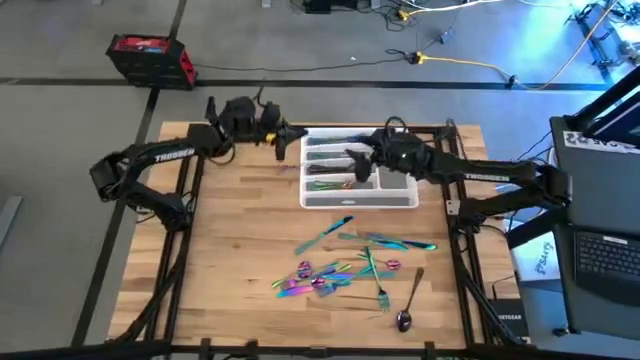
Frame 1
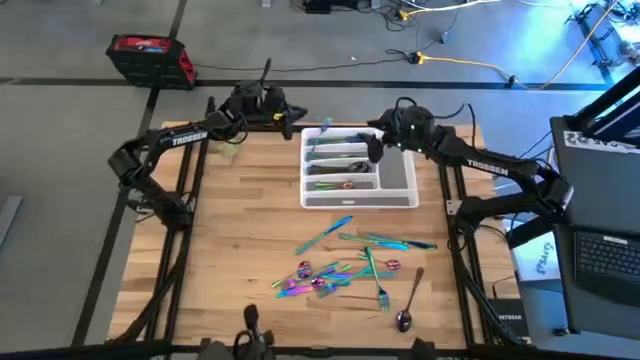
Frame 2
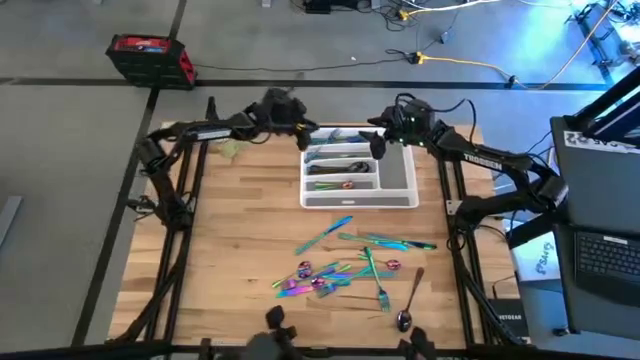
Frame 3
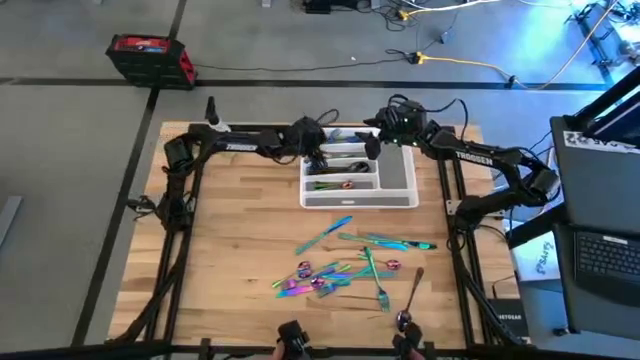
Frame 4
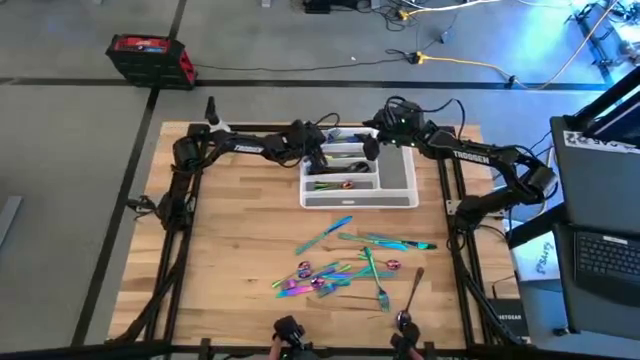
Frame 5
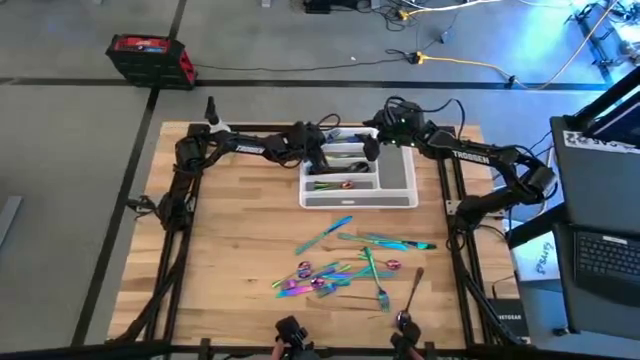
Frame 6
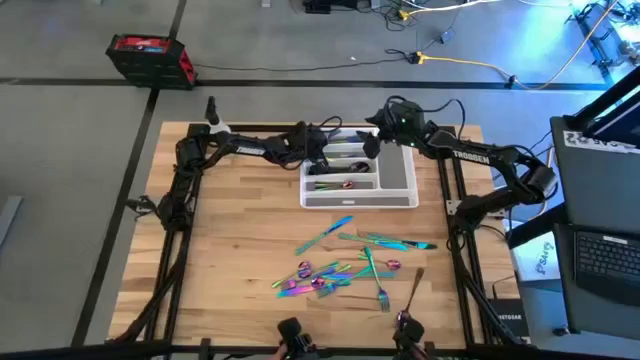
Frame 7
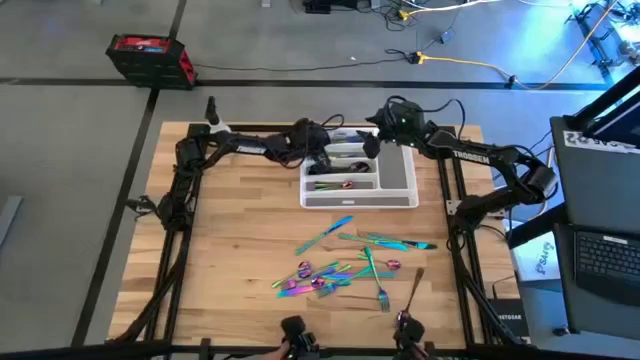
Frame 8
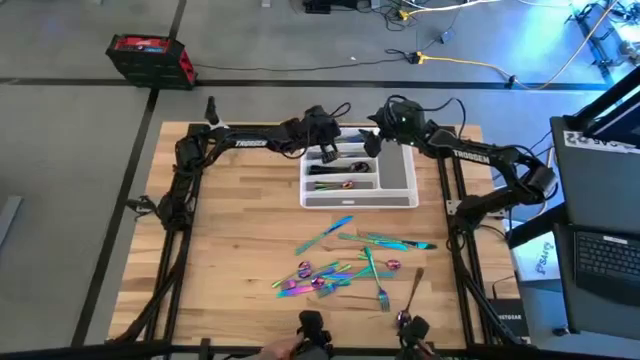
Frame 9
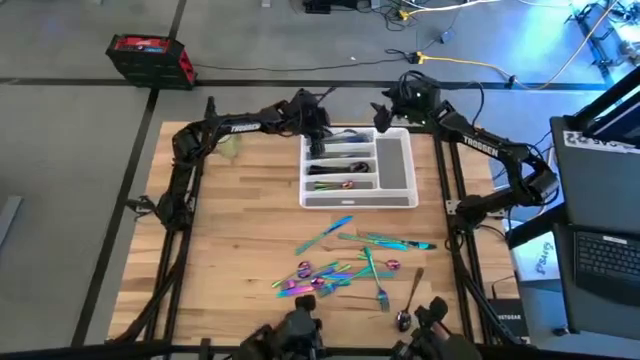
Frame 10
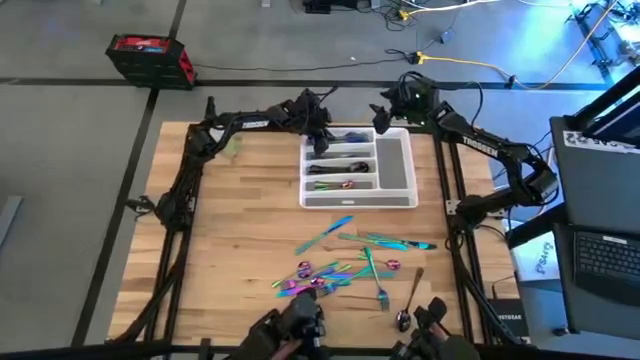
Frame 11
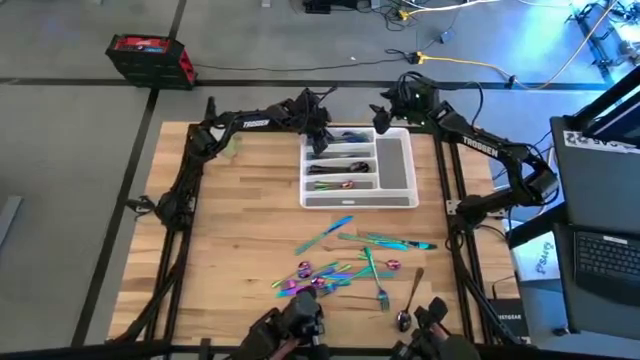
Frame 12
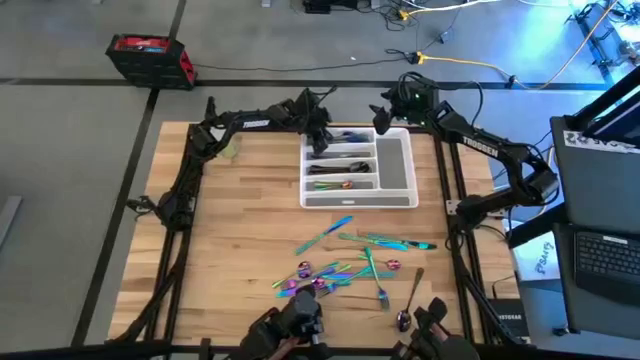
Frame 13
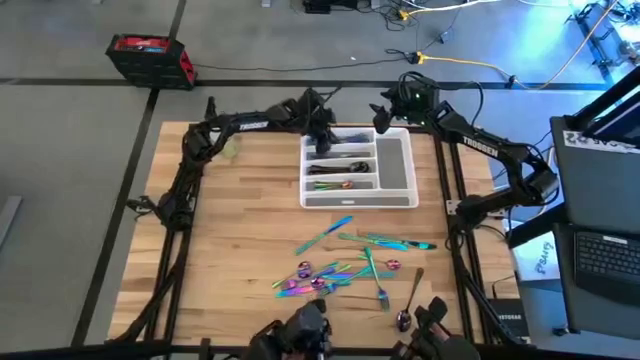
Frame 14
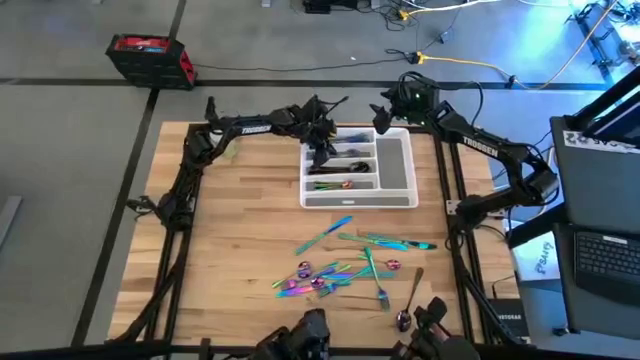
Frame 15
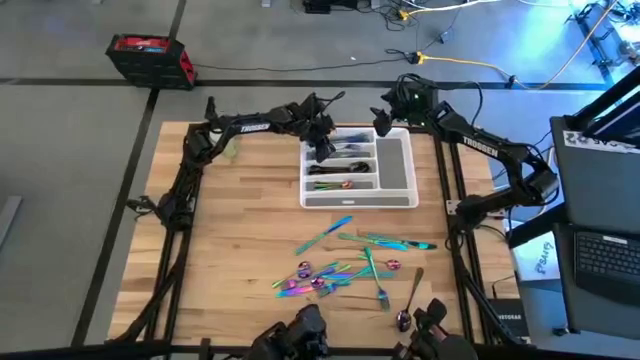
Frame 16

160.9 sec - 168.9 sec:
Task: Sort silverware
Put the blue fork on the white silverware tray

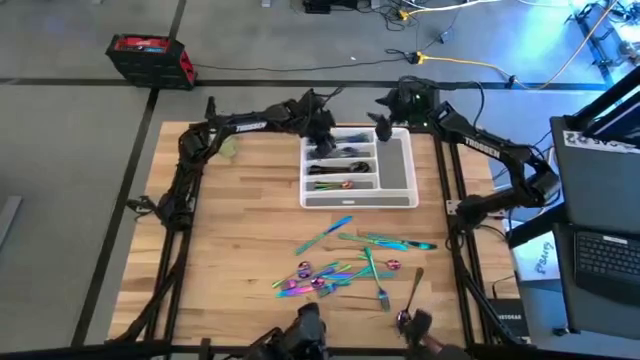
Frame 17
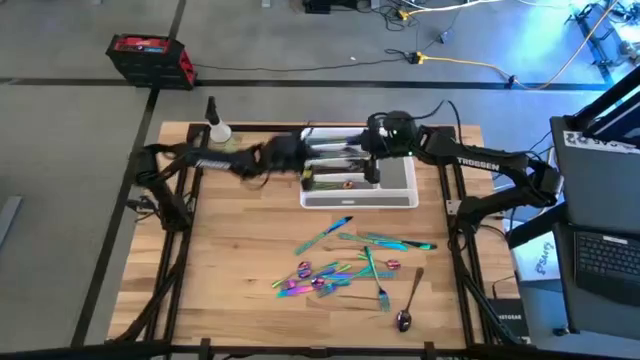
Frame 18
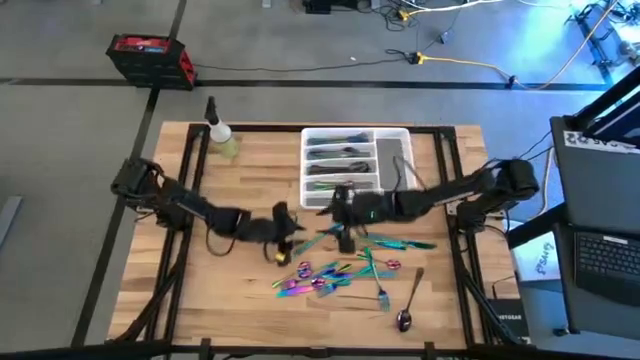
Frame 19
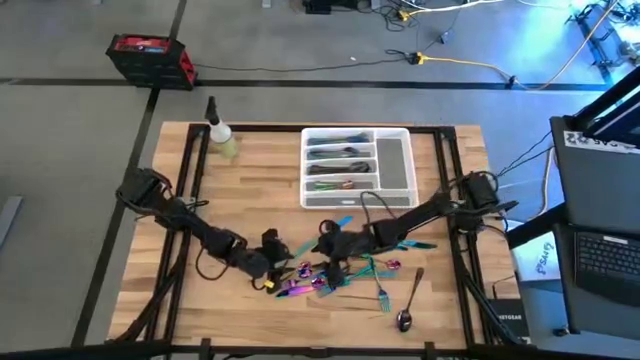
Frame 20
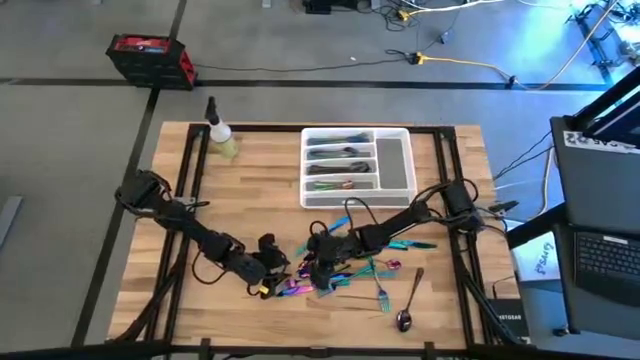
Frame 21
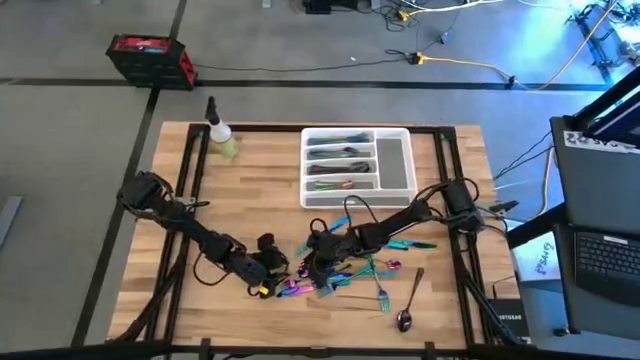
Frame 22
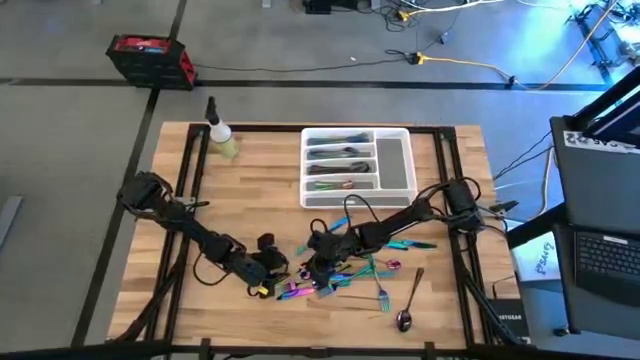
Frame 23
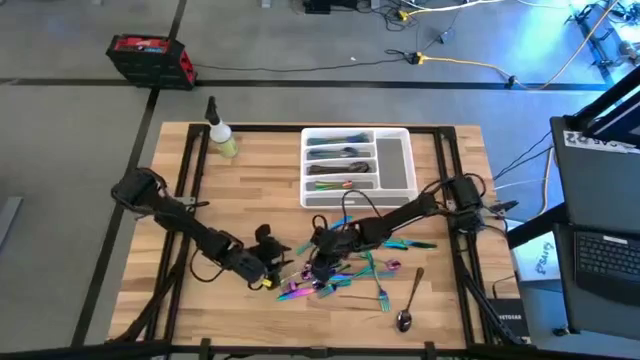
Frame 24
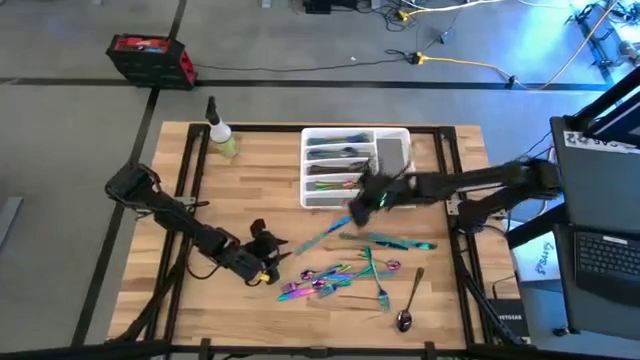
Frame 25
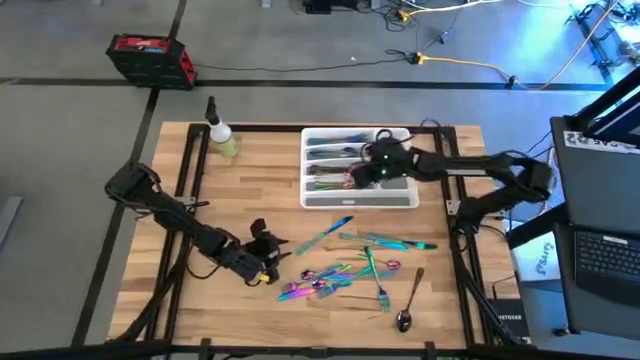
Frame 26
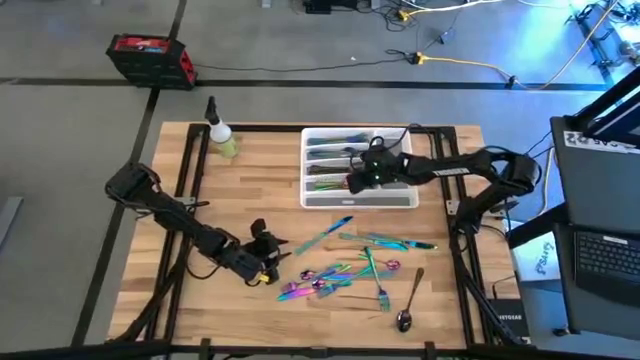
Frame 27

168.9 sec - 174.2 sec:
Put the blue teaspoon on the white silverware tray

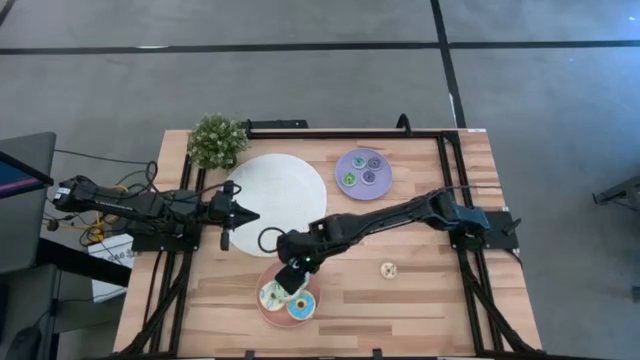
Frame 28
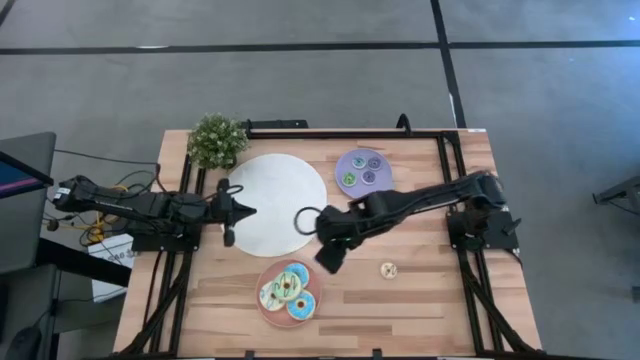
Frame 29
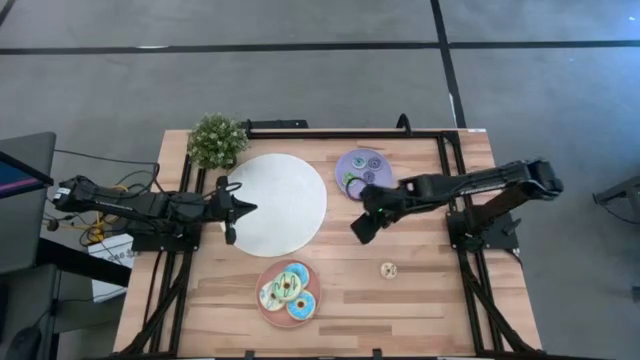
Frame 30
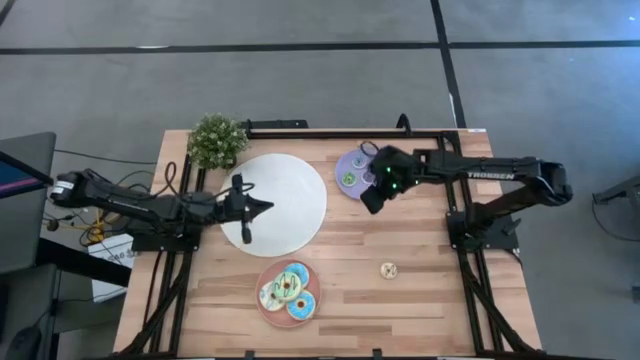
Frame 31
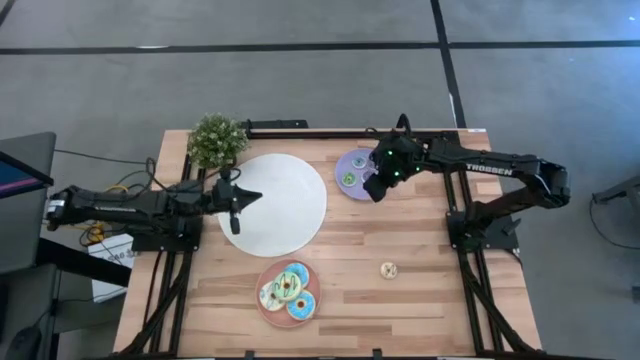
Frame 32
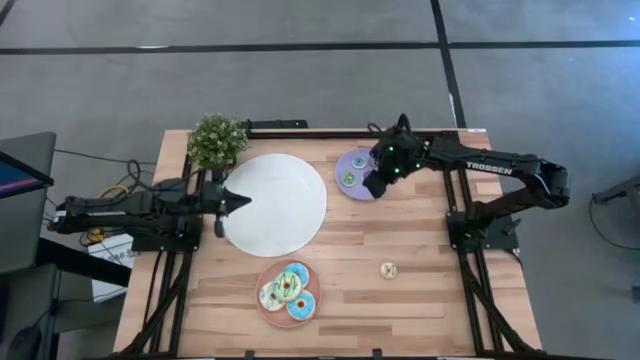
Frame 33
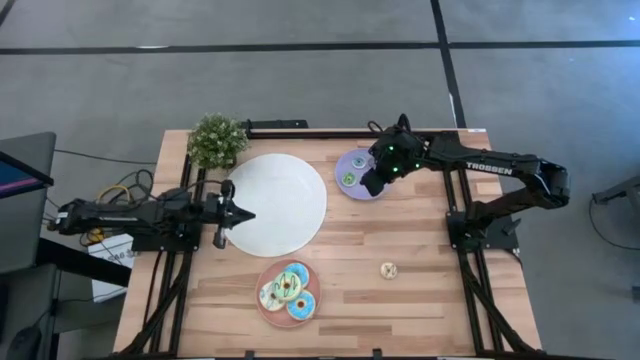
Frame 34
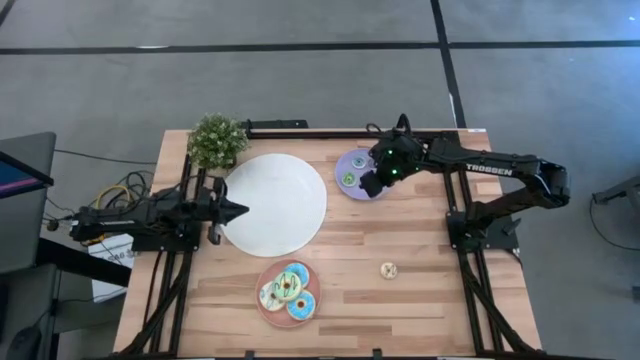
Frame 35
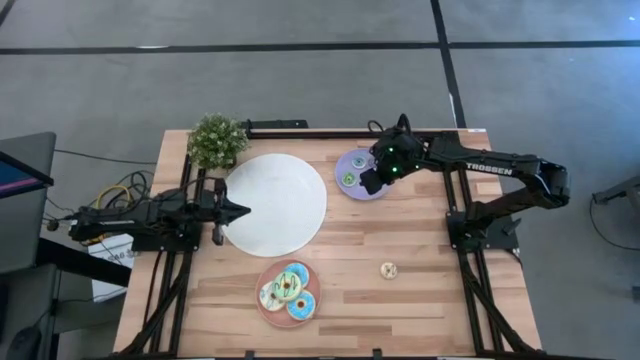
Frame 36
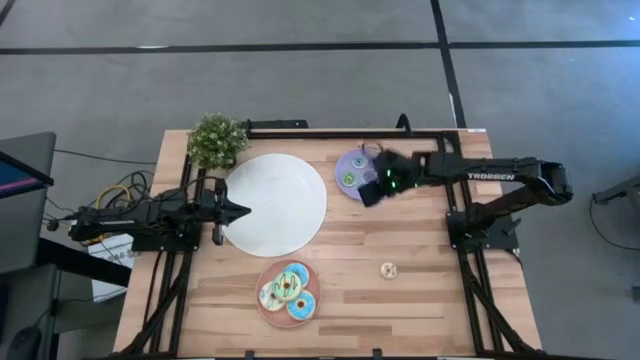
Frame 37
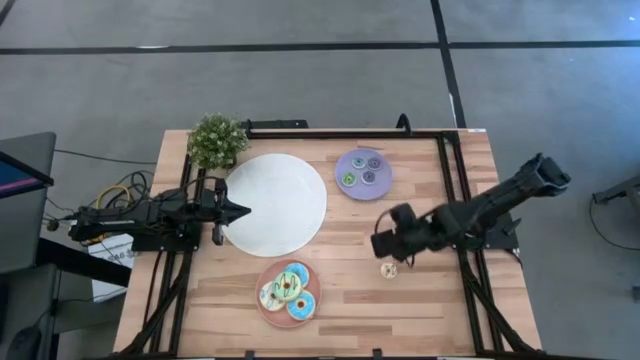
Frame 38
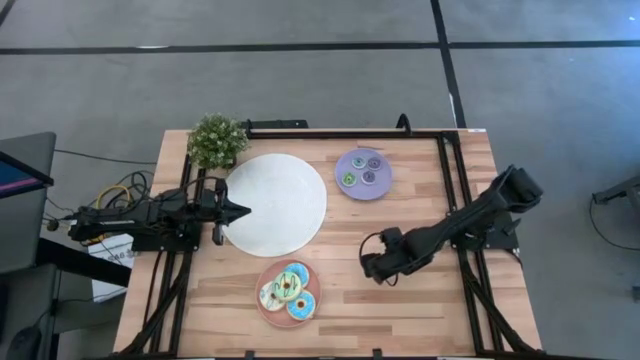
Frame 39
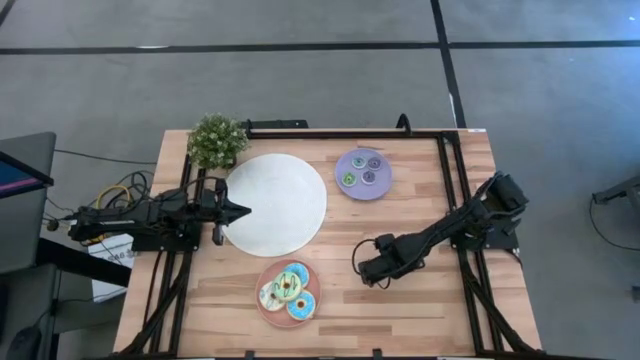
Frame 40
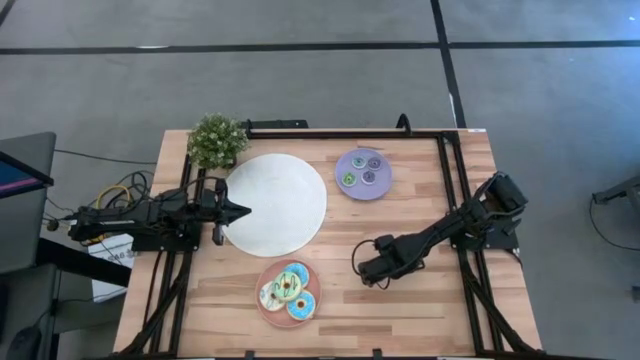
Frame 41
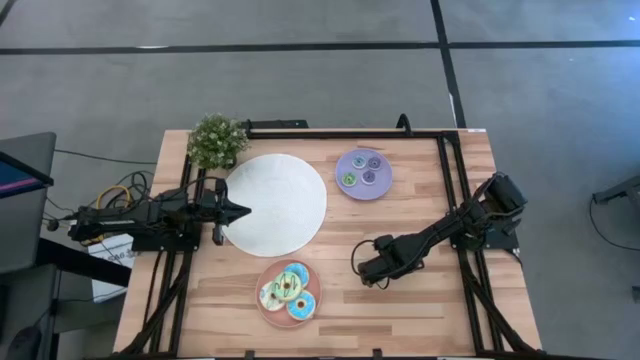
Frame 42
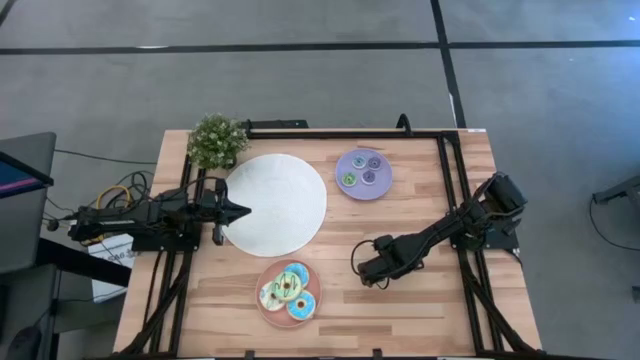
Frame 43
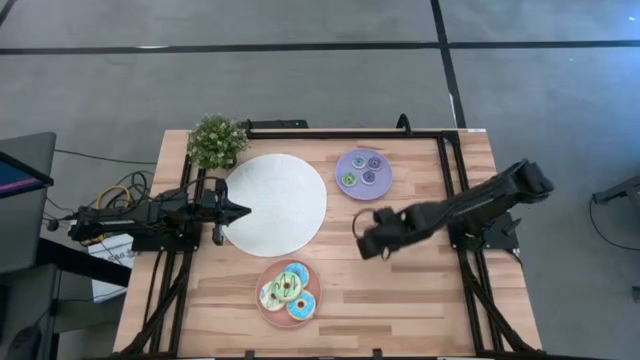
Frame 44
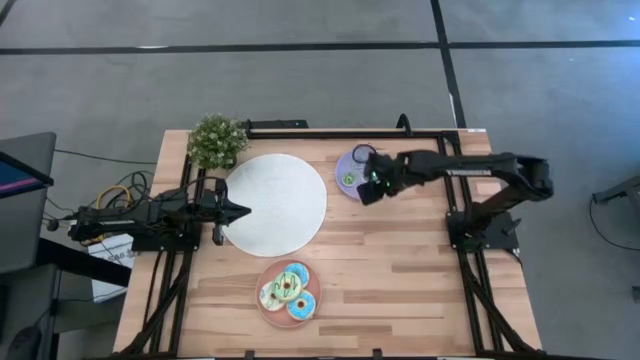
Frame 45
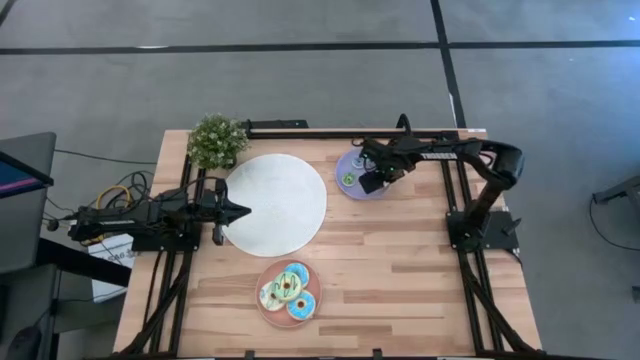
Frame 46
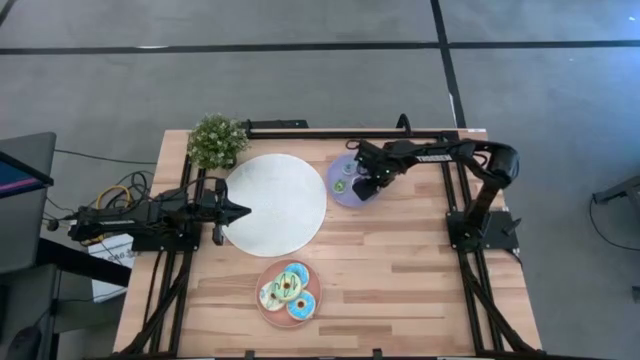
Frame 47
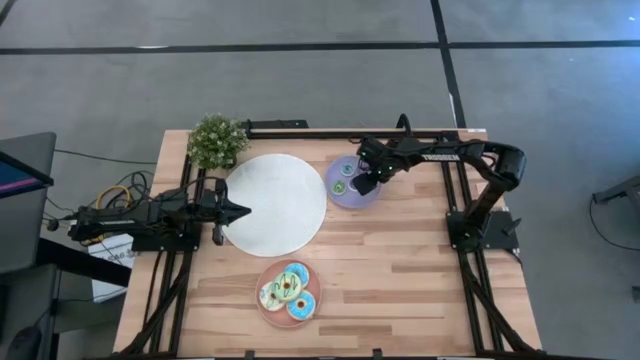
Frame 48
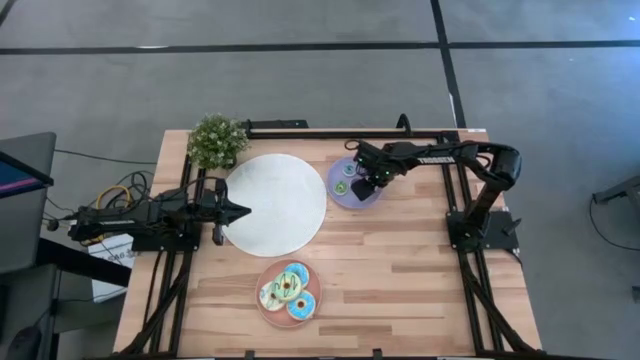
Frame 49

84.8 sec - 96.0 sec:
Task: Pick & Place donuts
Put the small white donut on the purple plate
